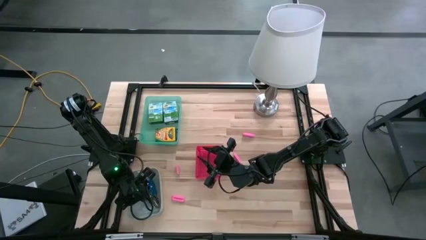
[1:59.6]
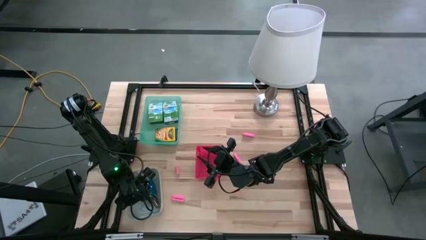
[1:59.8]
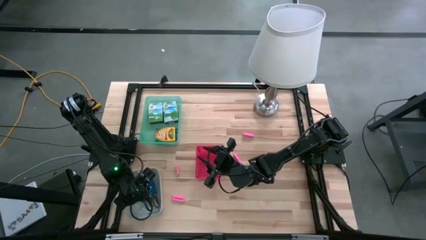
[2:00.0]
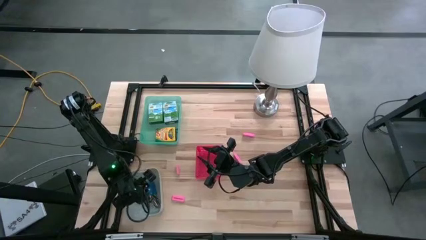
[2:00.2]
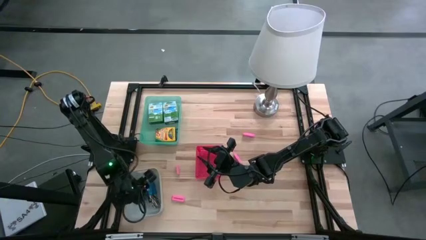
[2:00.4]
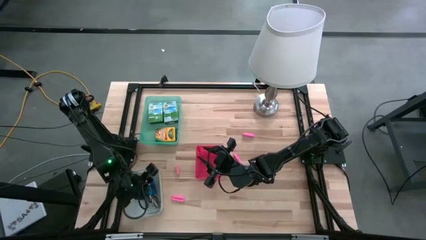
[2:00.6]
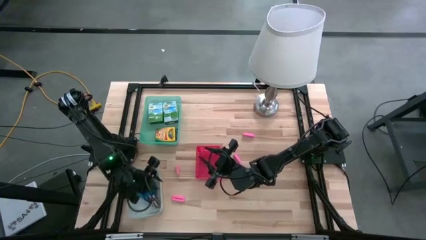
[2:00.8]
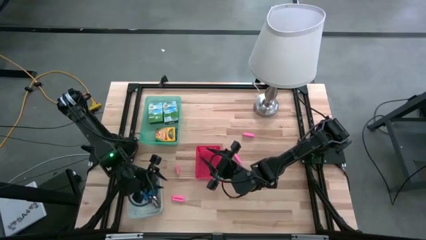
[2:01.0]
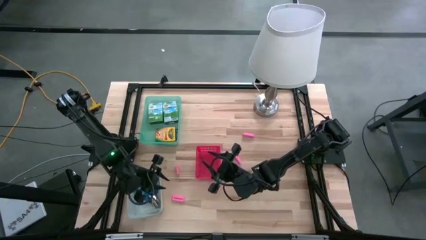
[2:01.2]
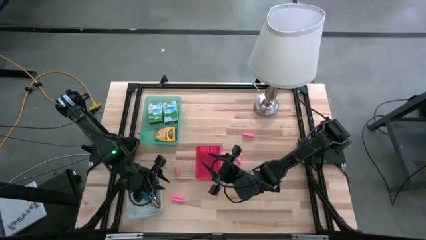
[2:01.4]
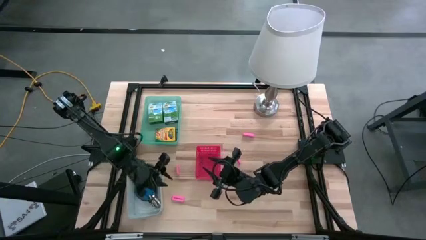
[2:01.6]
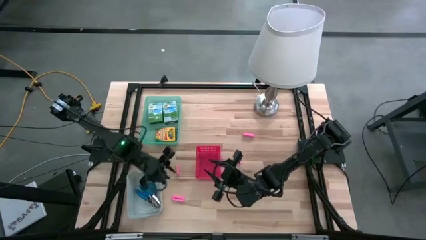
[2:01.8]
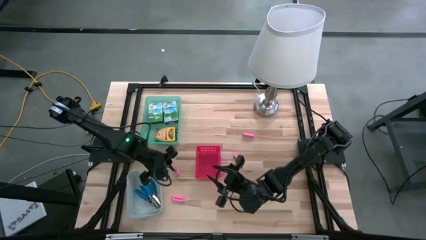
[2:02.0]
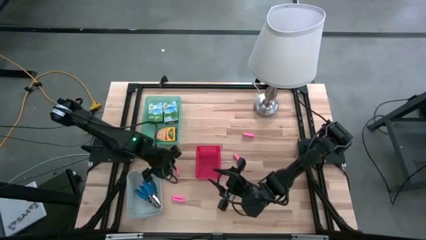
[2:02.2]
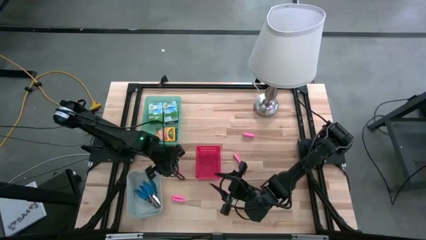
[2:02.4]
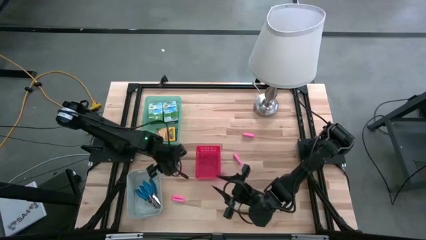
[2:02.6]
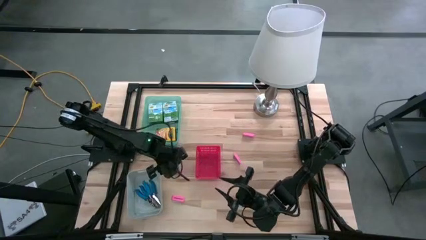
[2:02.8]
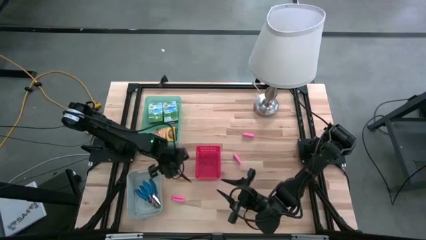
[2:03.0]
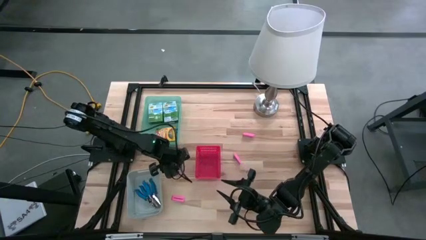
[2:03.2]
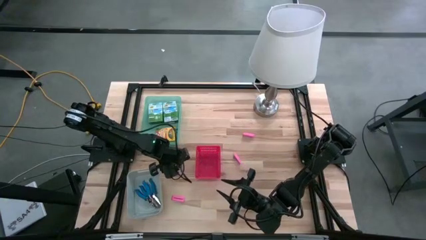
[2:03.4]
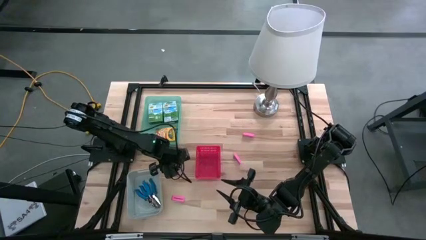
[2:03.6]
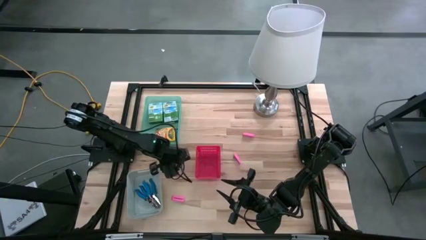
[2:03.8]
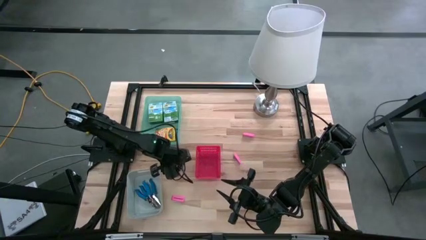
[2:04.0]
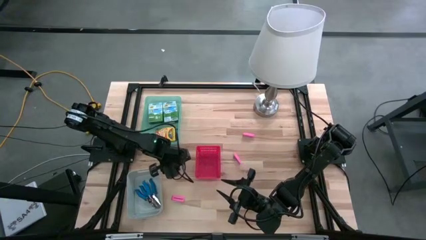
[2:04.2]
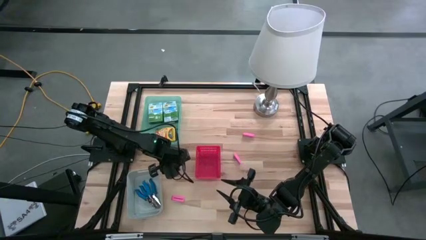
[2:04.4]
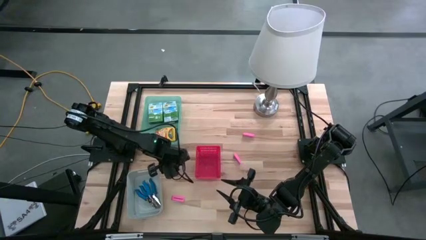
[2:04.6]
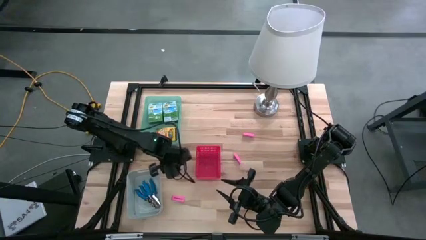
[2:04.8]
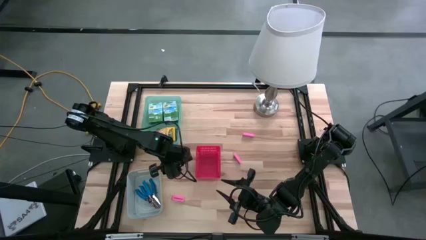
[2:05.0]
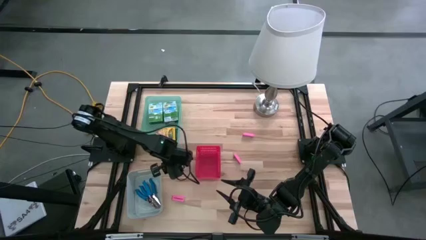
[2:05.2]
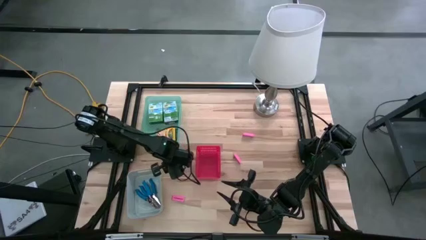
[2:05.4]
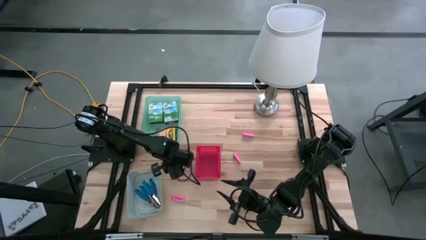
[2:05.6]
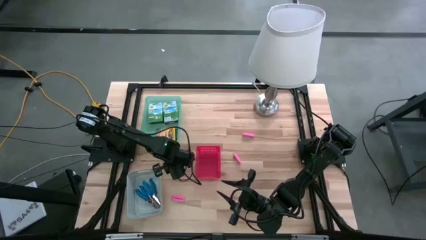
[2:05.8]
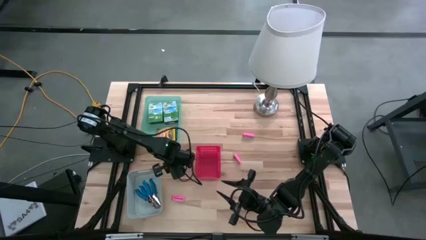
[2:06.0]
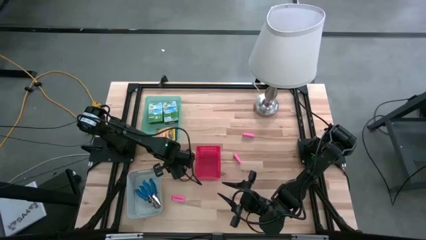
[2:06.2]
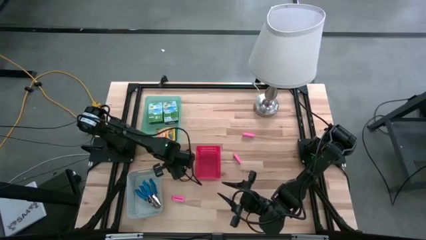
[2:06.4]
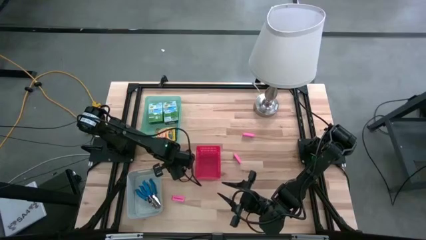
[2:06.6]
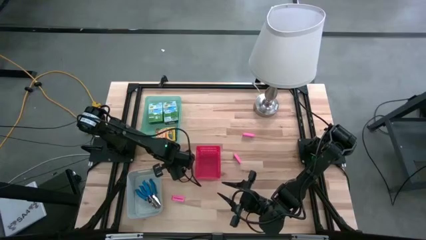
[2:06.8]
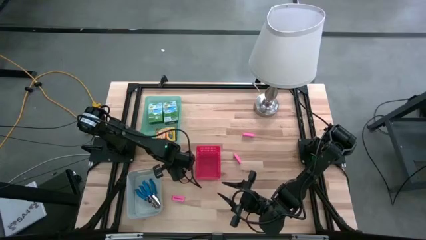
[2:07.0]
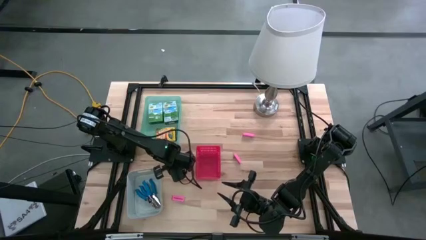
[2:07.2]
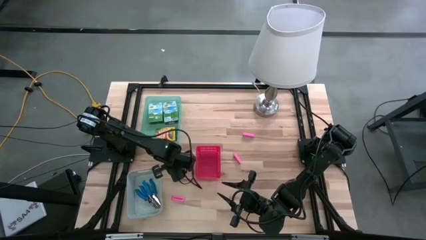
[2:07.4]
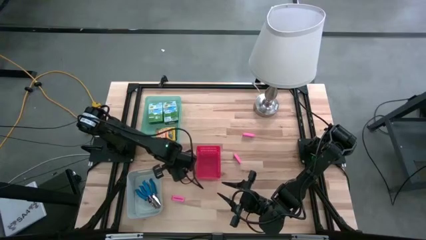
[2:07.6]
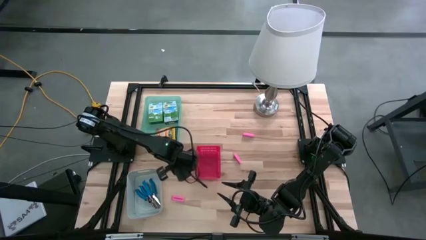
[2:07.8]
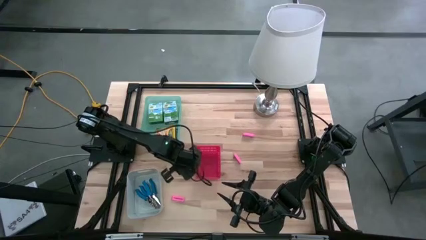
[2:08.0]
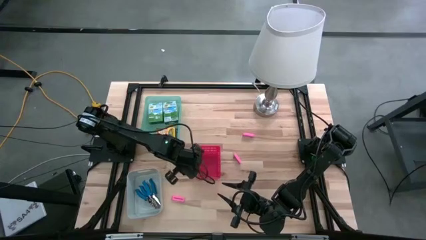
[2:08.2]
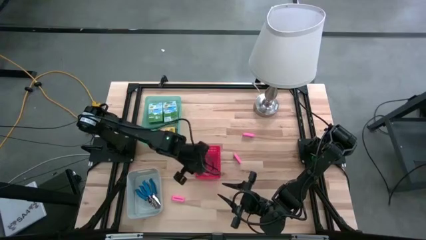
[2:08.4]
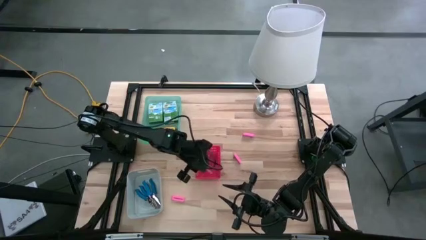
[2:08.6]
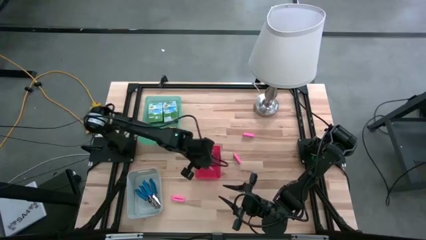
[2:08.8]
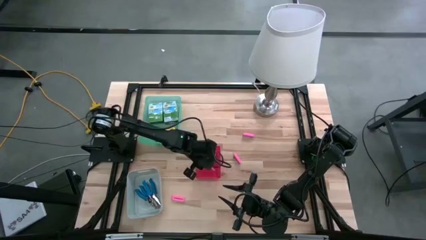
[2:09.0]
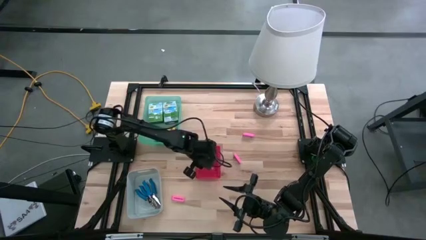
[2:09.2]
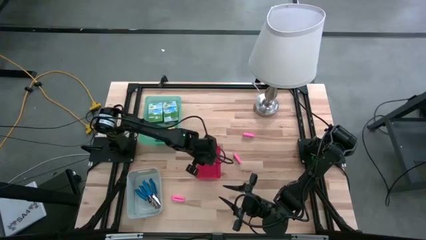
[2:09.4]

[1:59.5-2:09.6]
Task: Pick & Place School Supplies
Put the pink eraser into the red bin

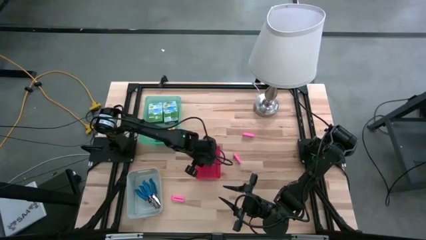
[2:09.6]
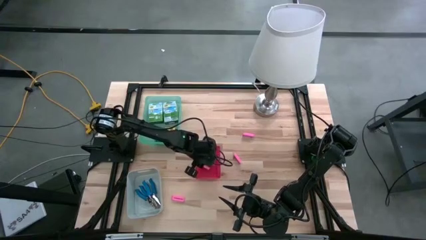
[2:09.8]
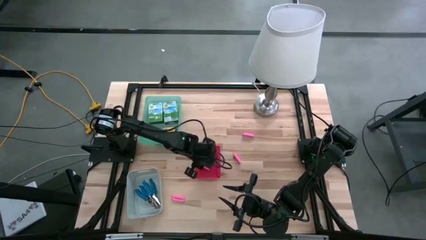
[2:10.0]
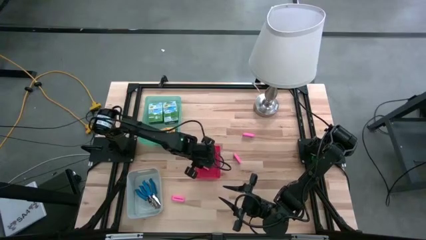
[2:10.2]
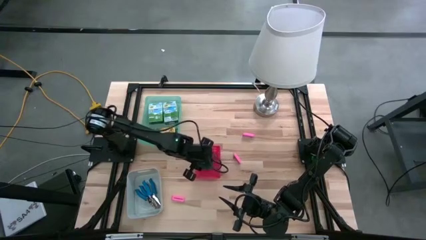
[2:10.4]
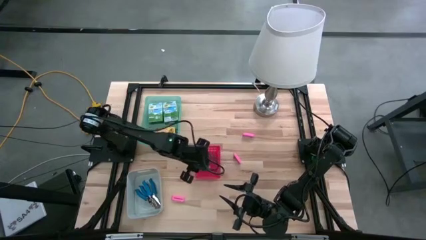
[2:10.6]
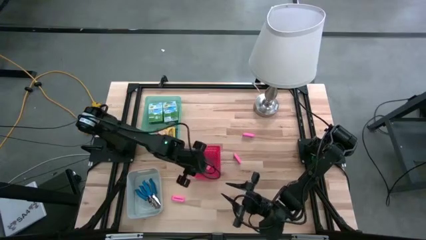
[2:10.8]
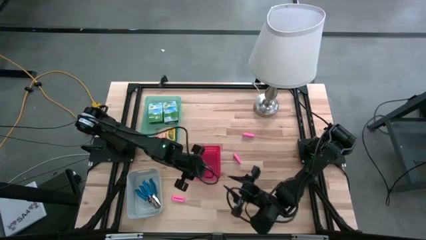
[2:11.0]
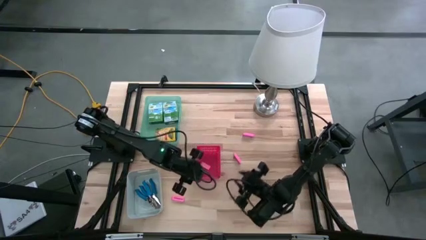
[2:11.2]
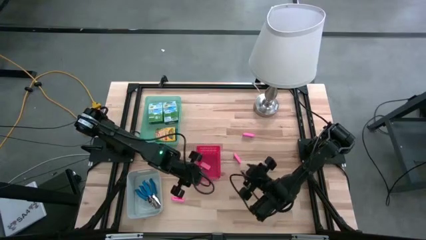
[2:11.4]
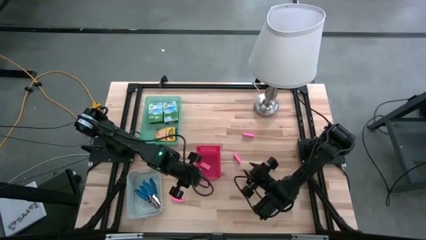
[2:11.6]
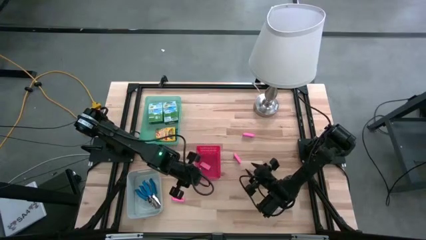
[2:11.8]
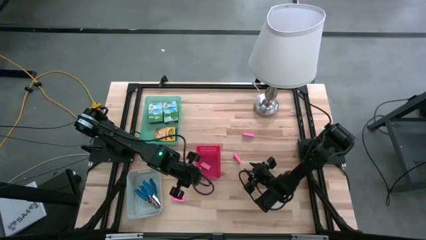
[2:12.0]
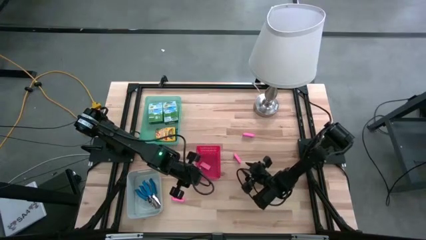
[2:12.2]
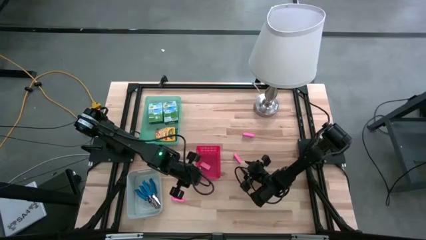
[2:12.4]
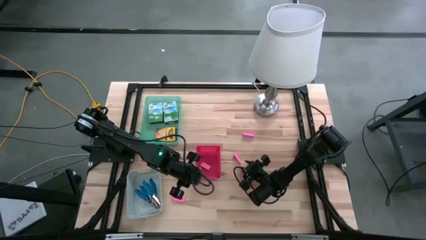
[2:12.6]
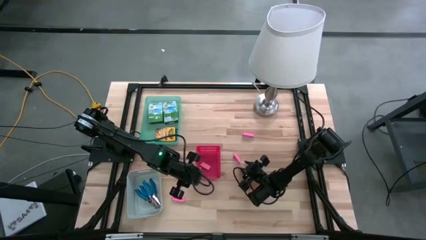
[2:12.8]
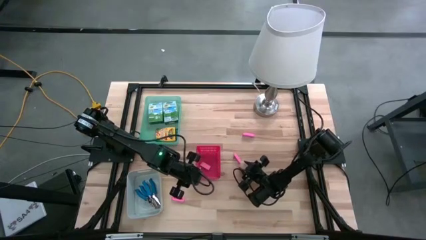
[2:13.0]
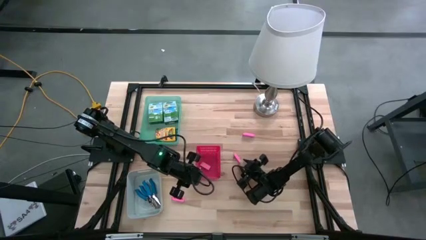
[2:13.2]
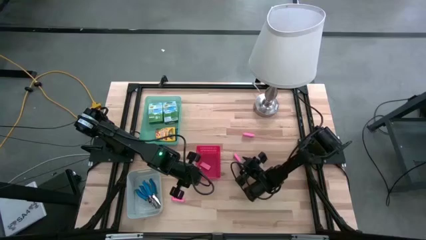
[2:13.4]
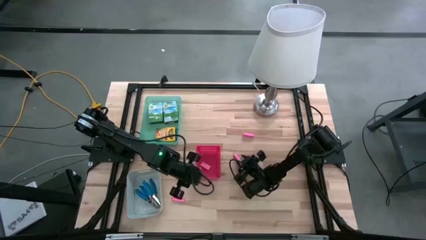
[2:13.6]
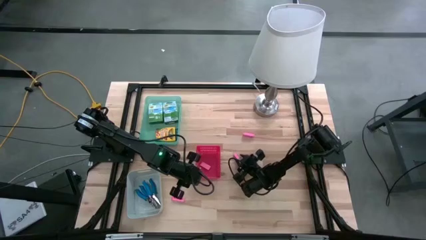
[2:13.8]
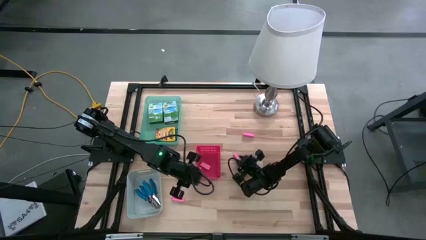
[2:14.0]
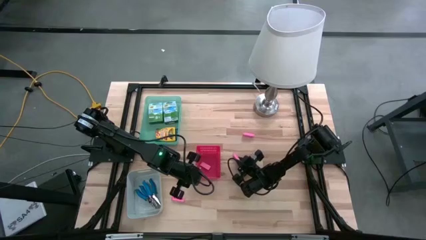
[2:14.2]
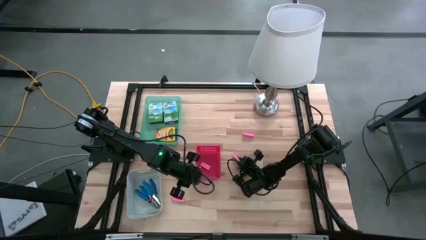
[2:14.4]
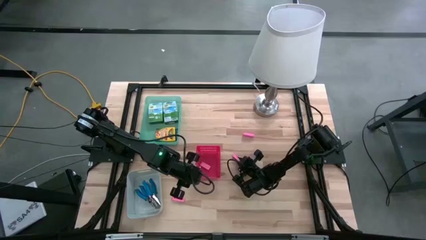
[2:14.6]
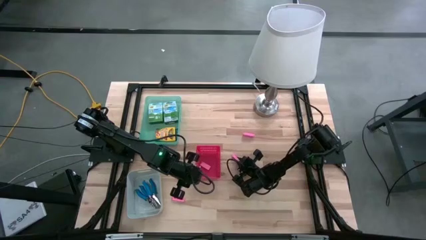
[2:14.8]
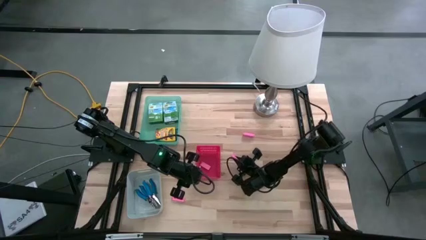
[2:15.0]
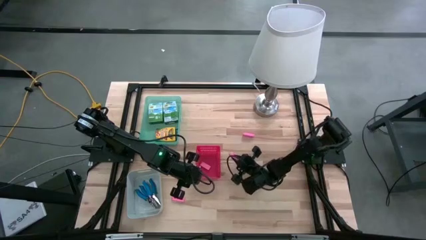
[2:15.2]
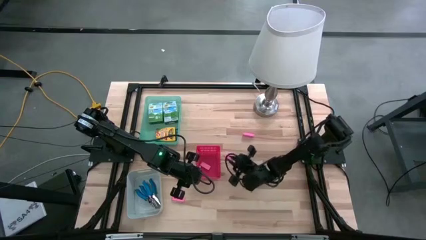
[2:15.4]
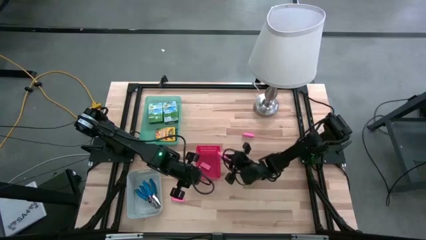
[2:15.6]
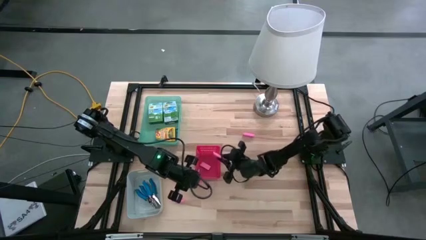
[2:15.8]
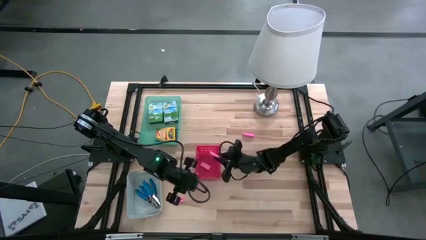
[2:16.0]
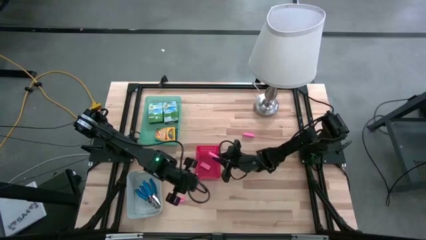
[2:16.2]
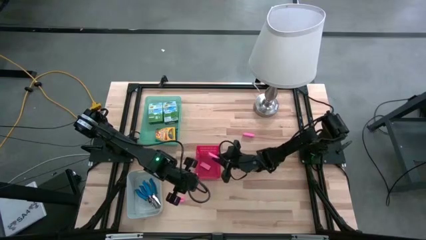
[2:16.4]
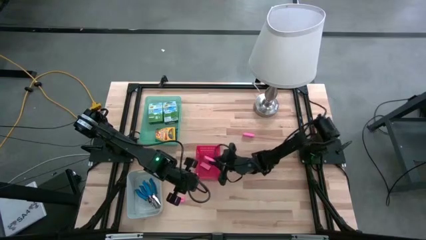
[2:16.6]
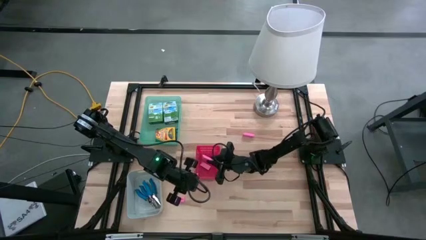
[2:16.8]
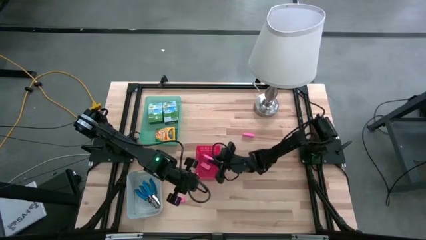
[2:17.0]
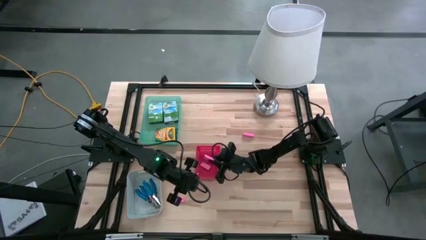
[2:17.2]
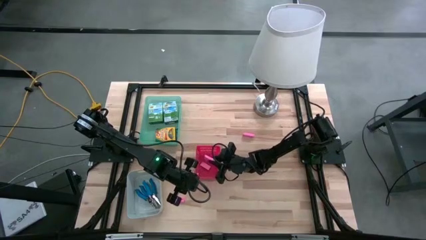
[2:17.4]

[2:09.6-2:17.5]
Put the pink eraser into the red bin
